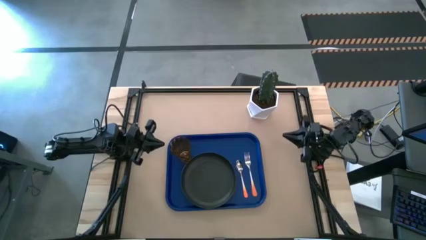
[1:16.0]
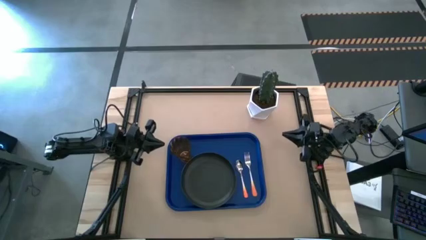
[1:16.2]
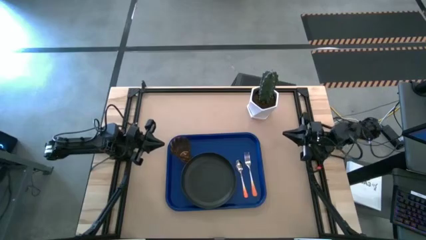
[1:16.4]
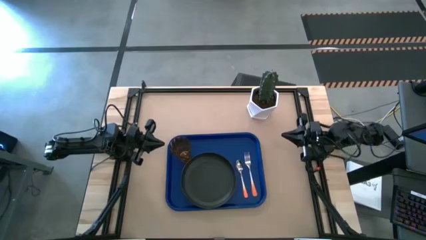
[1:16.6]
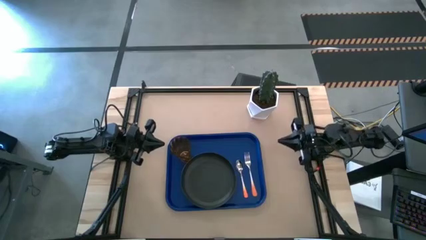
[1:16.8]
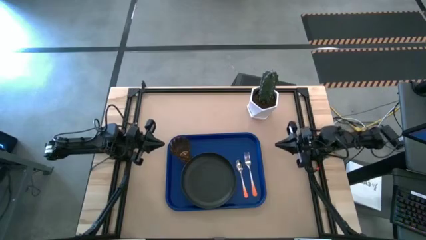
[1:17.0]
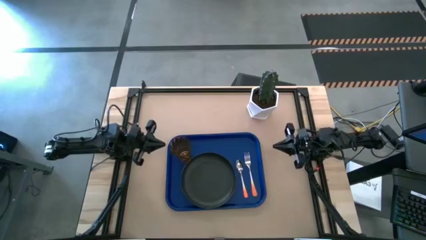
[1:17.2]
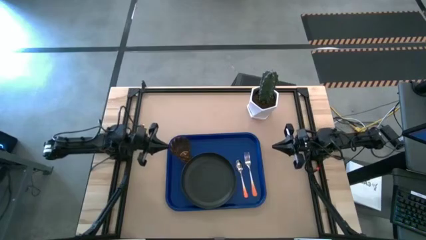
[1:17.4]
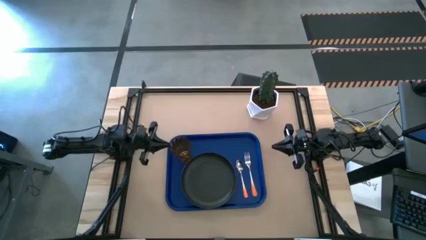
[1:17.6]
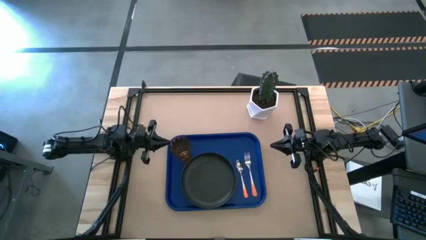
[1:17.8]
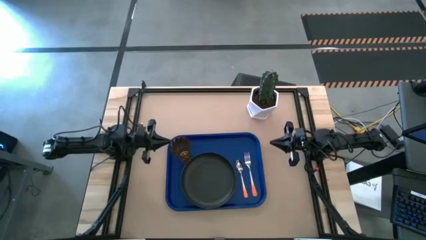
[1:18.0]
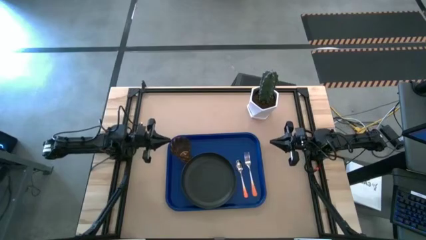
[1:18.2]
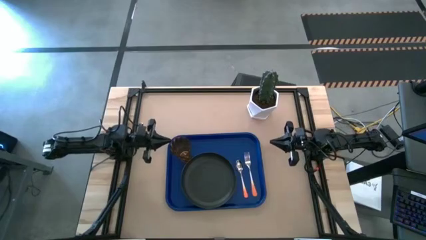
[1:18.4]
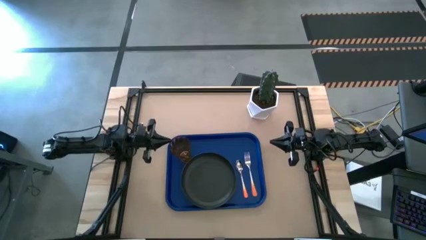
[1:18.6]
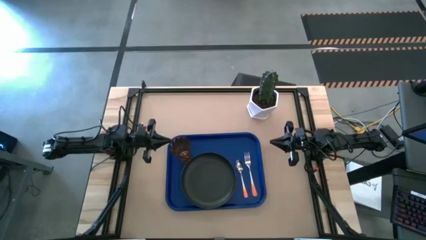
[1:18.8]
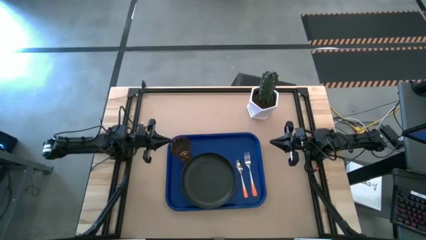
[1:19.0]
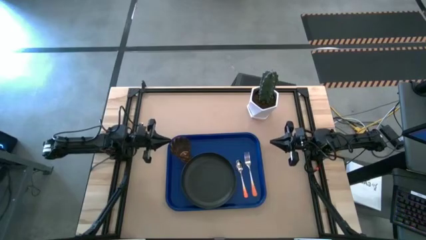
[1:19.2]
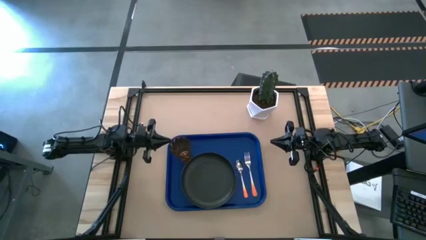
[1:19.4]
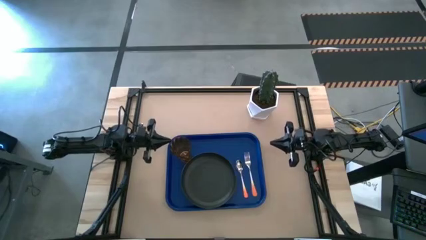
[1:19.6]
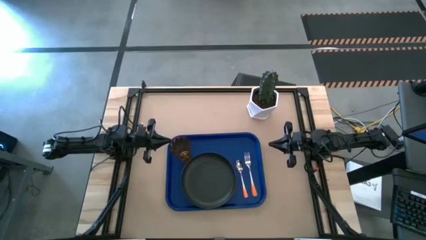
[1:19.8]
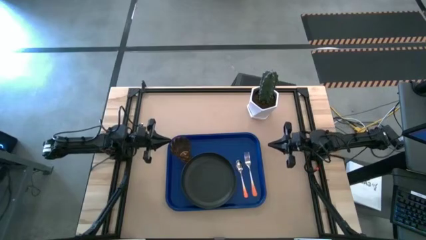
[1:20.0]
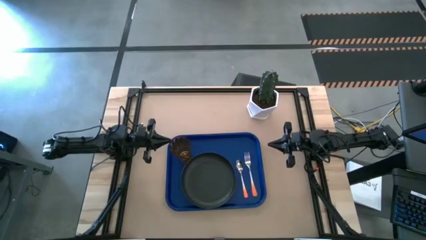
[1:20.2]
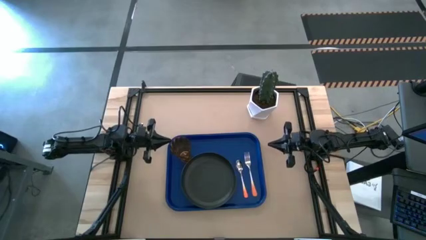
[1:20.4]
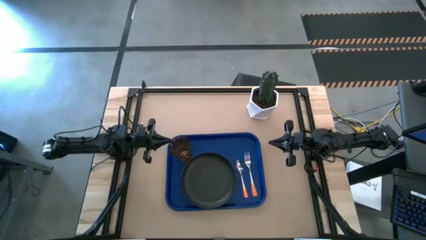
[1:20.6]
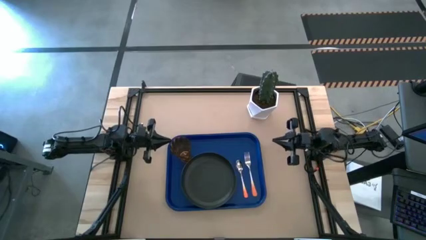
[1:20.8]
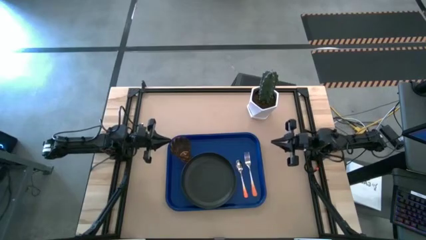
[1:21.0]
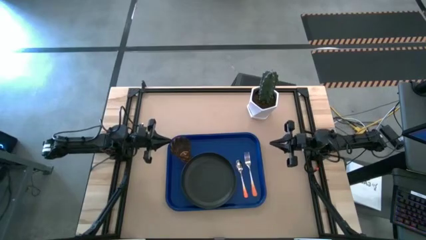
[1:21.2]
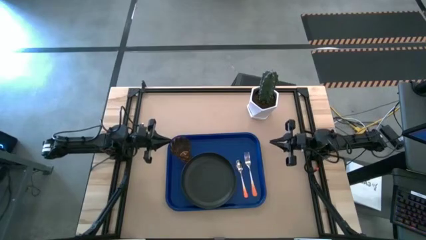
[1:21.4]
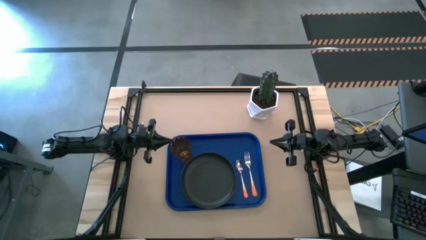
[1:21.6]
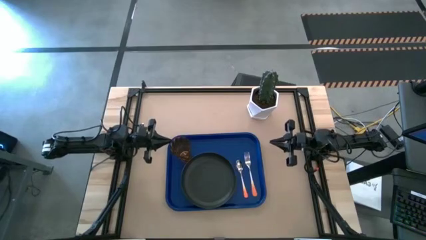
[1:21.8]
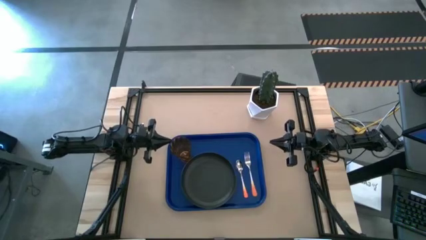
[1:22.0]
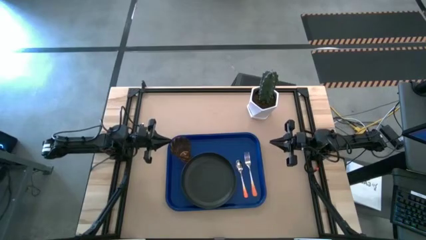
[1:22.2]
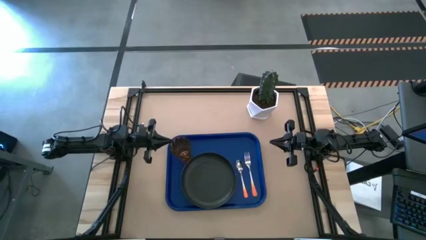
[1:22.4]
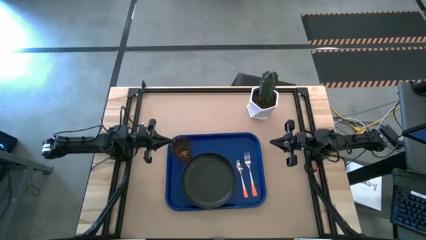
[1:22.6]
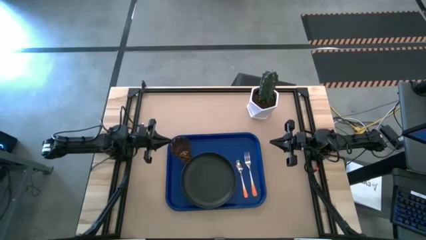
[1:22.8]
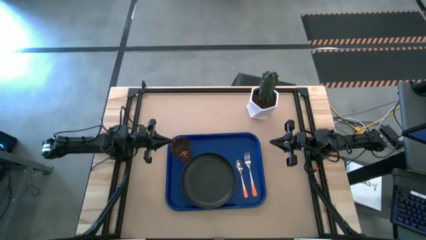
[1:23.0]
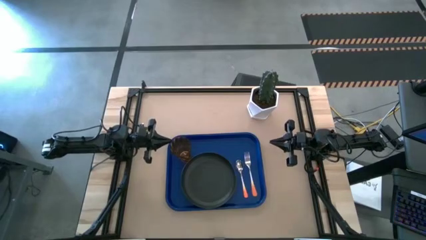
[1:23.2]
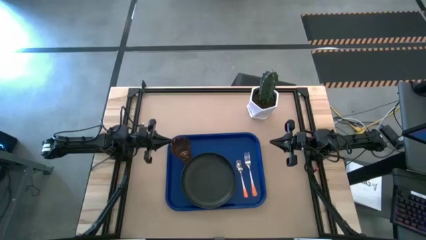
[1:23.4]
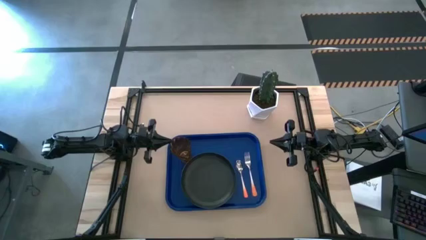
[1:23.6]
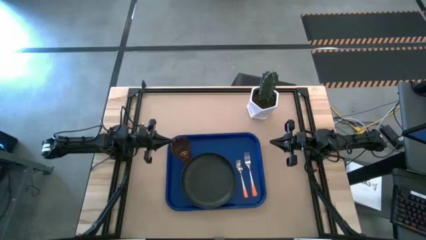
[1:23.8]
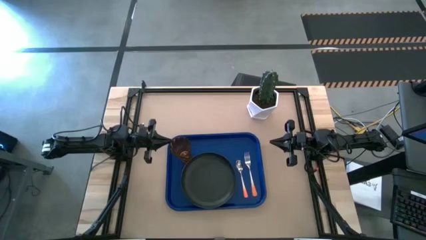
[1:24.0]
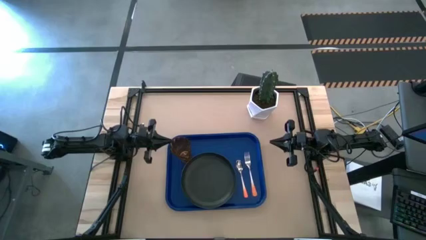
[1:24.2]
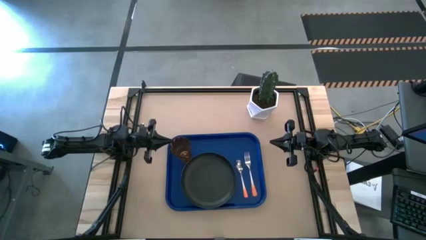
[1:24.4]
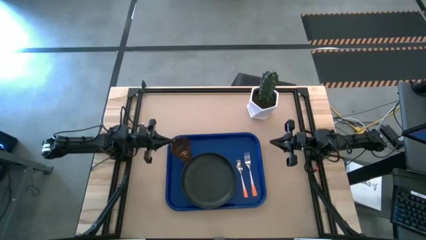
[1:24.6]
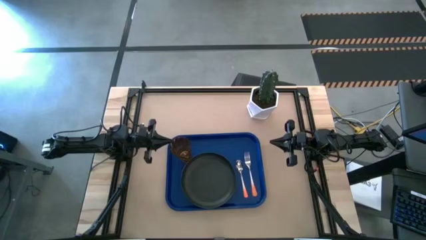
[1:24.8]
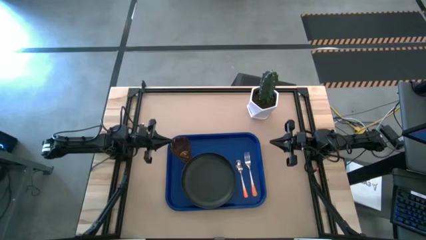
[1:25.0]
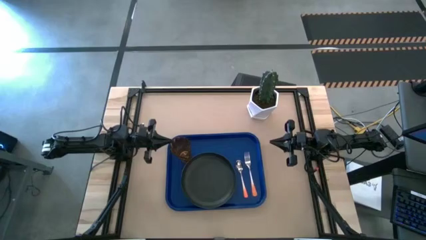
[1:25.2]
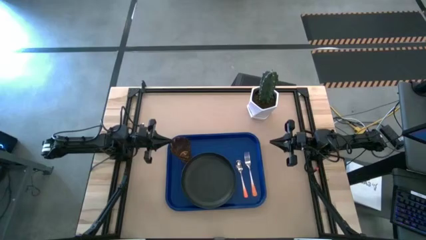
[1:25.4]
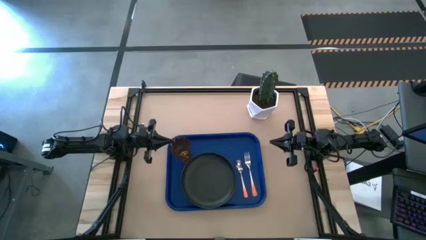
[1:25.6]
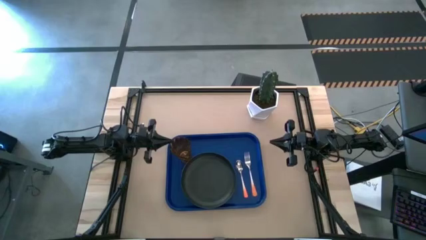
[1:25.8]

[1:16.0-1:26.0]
Task: Pick and place plate/cup/fork/spoon on tray
Return to Home Position

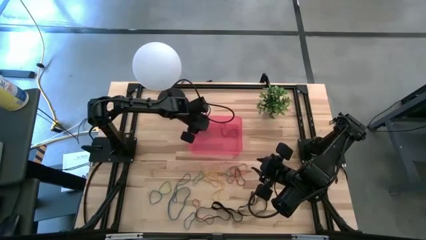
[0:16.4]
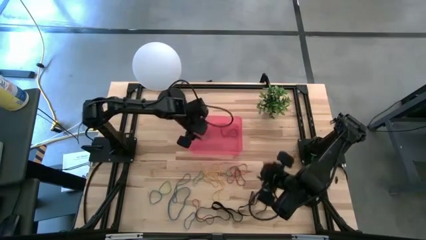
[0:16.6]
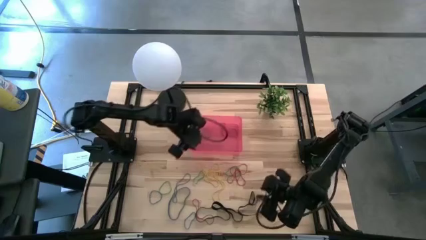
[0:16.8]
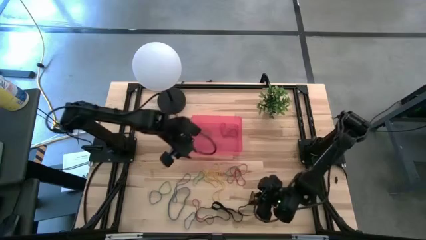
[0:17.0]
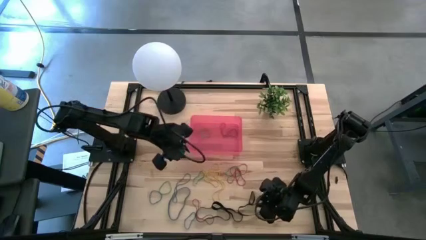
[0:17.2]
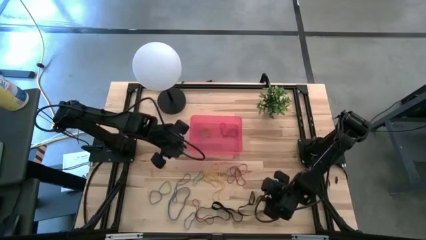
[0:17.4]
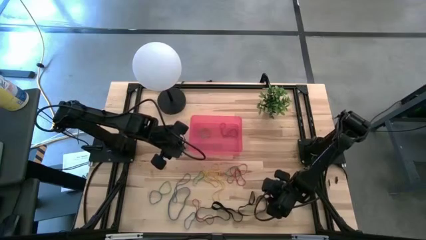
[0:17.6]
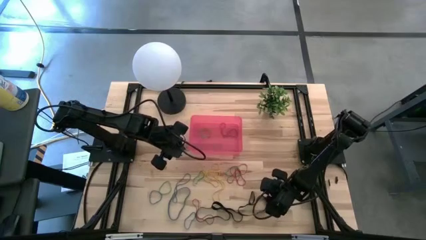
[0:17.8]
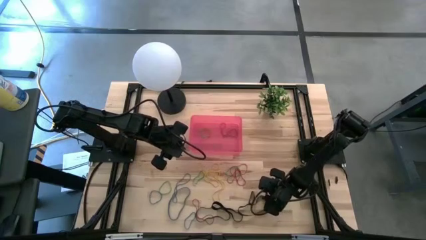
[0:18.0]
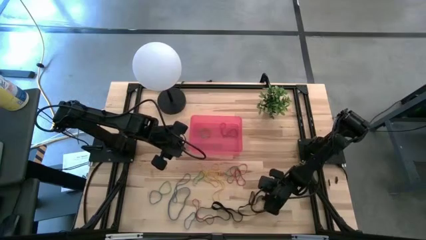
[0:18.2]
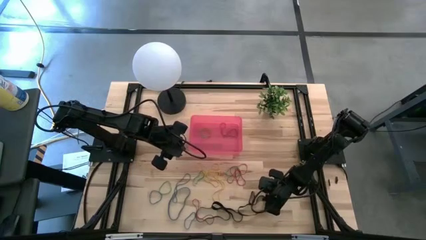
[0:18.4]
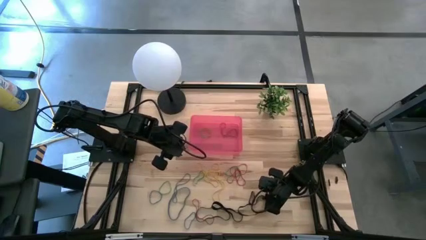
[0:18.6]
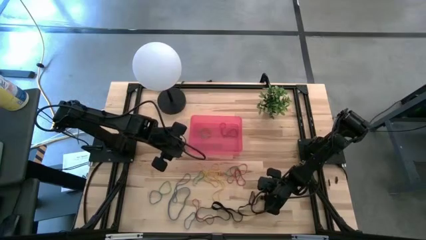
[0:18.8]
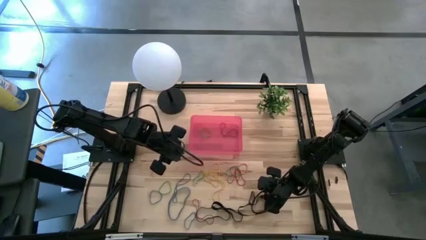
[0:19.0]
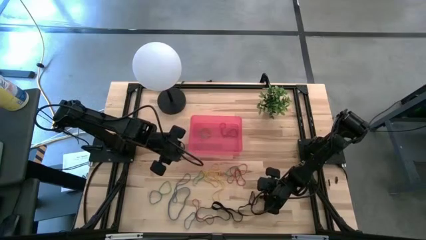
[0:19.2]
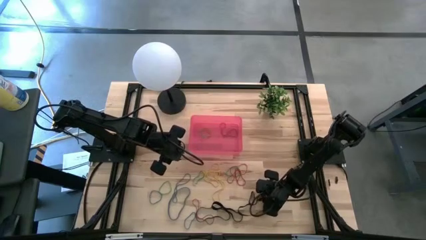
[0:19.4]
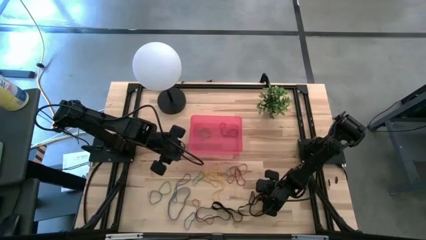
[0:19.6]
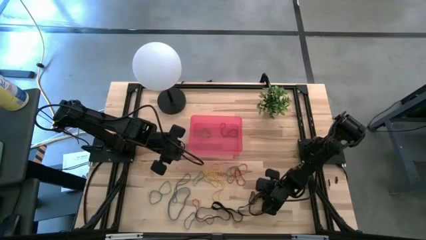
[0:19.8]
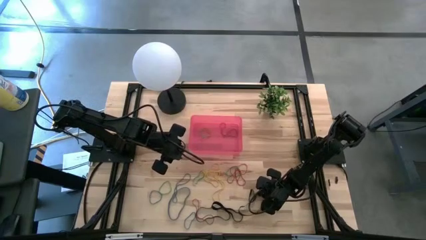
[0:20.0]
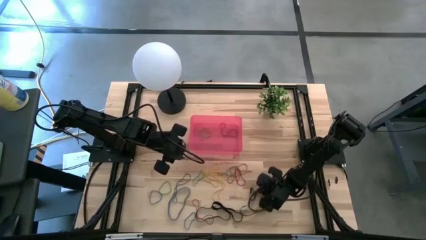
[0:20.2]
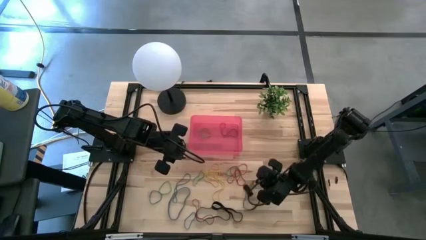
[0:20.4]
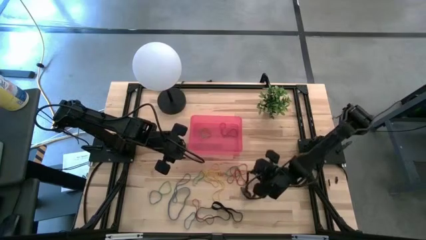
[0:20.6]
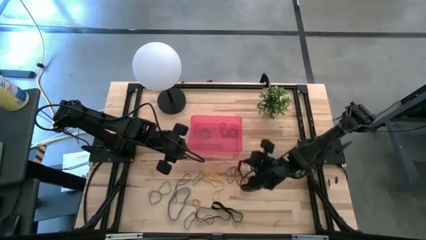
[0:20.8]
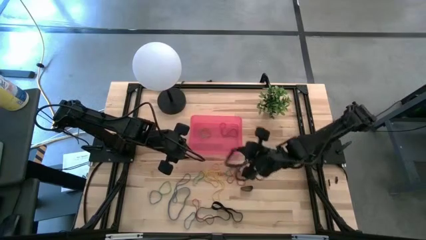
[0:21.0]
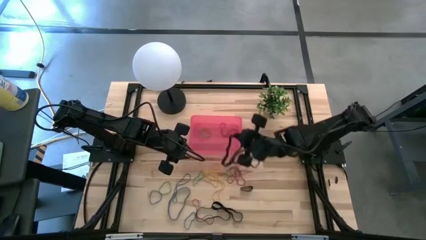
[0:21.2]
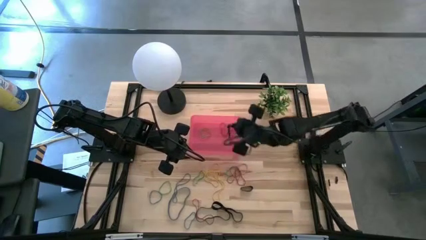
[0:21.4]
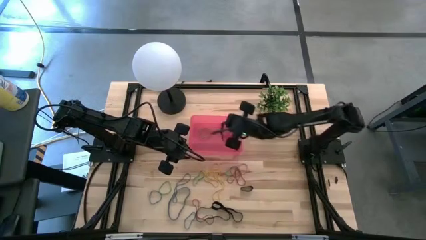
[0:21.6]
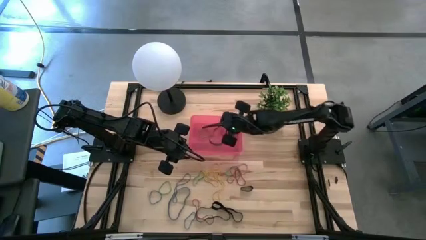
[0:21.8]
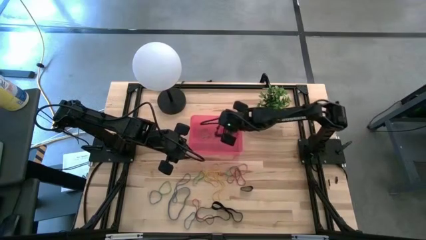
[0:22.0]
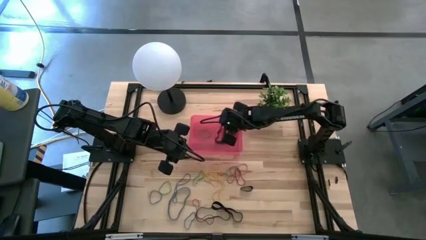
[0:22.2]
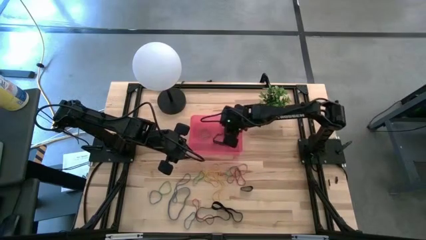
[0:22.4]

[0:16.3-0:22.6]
Task: Pick and place rubber bands into bin
Put the black rubber band into the red bin
